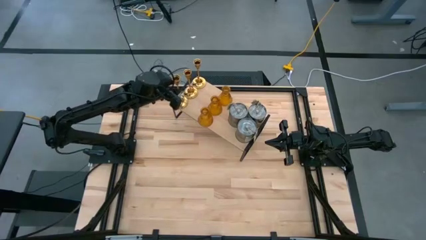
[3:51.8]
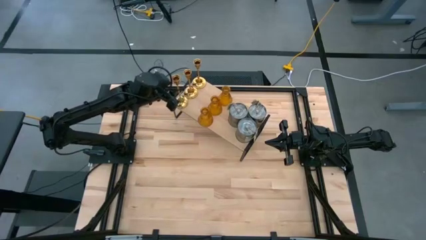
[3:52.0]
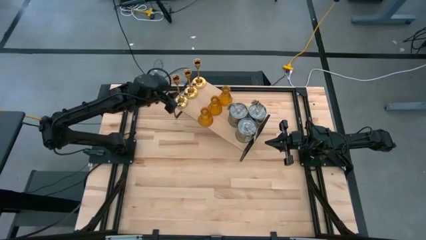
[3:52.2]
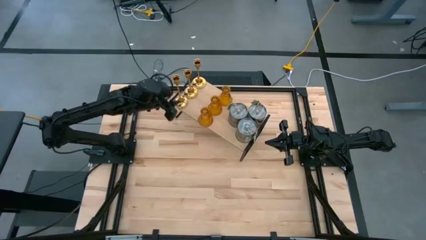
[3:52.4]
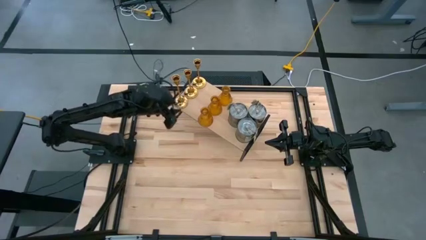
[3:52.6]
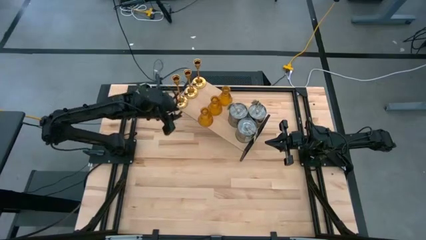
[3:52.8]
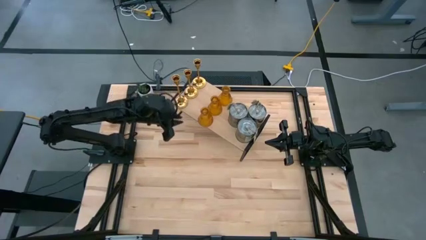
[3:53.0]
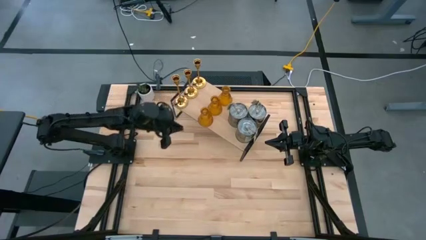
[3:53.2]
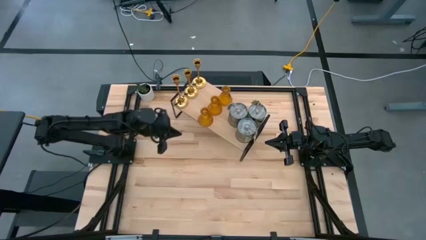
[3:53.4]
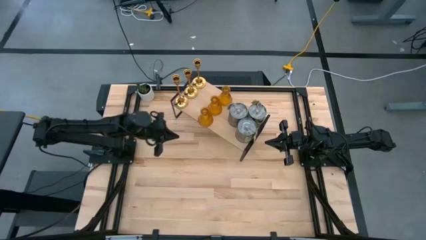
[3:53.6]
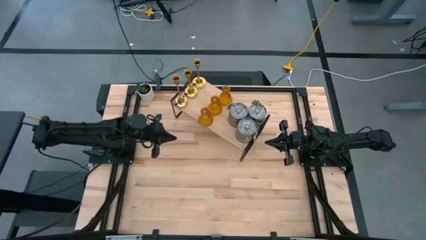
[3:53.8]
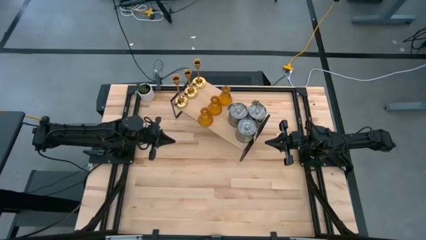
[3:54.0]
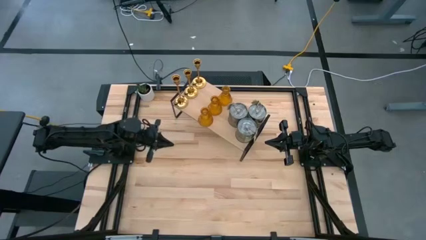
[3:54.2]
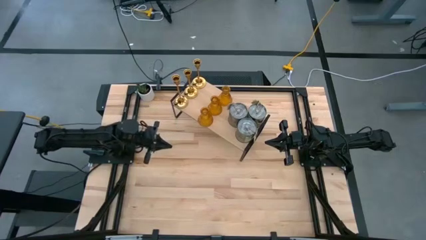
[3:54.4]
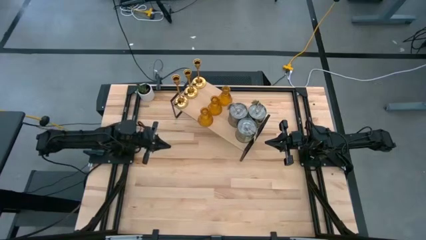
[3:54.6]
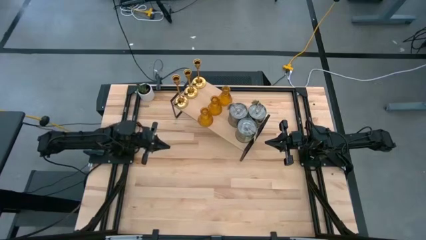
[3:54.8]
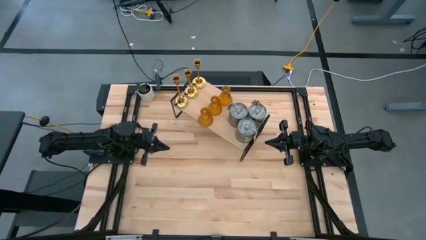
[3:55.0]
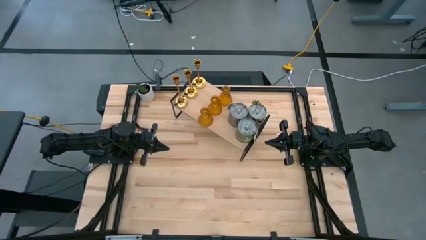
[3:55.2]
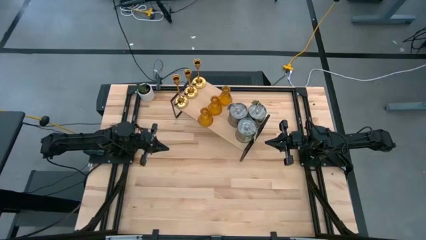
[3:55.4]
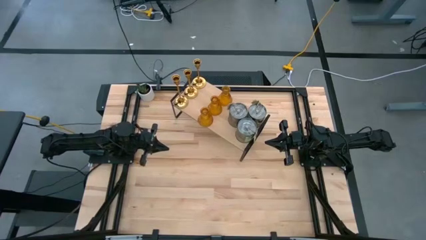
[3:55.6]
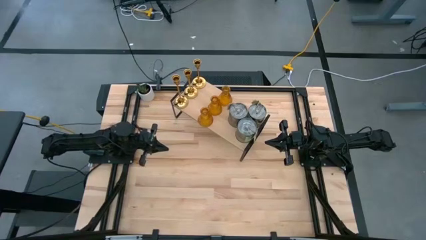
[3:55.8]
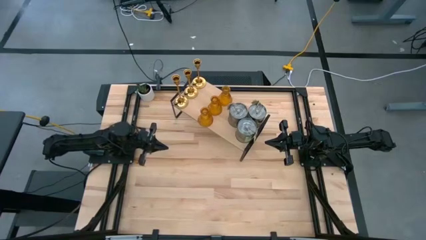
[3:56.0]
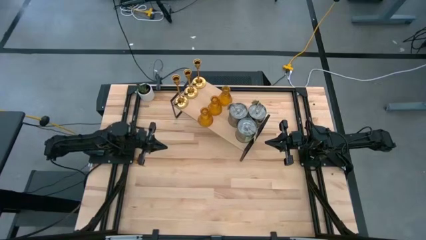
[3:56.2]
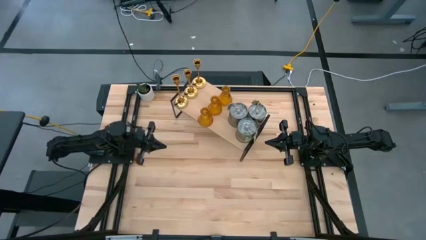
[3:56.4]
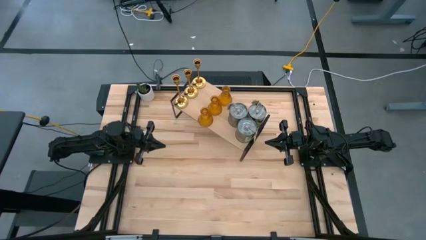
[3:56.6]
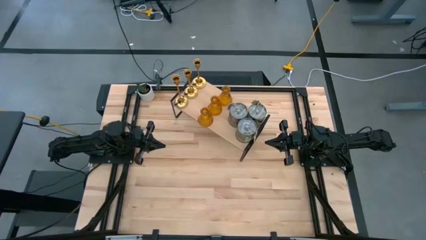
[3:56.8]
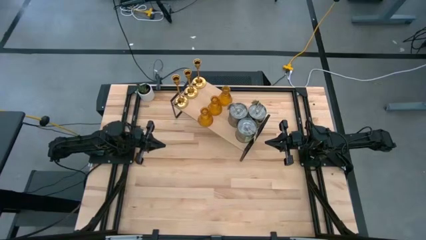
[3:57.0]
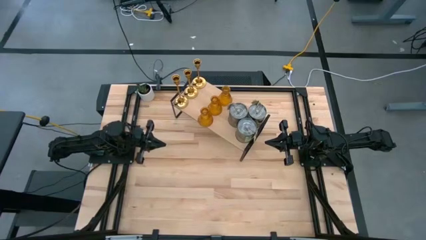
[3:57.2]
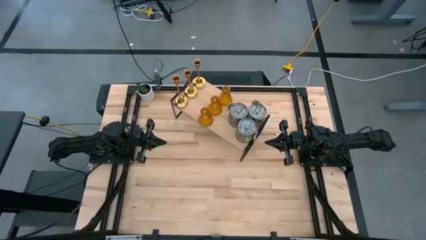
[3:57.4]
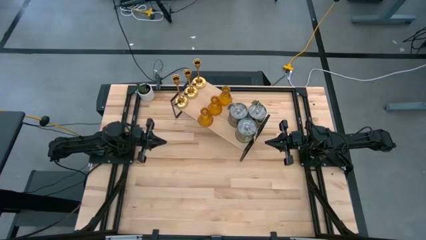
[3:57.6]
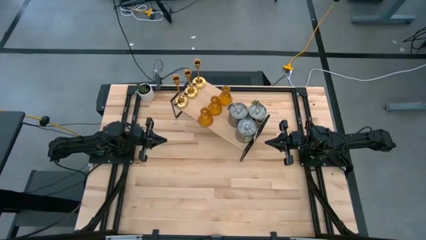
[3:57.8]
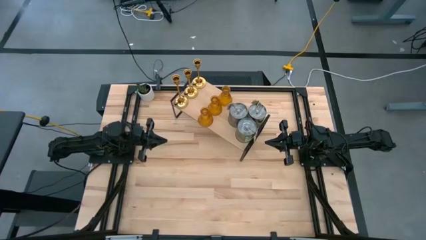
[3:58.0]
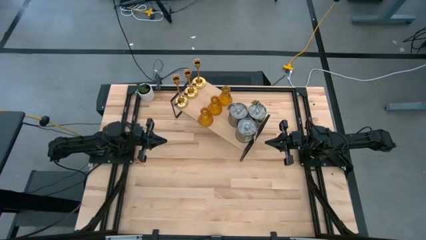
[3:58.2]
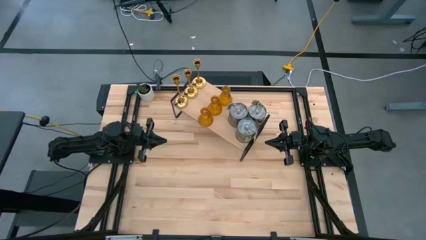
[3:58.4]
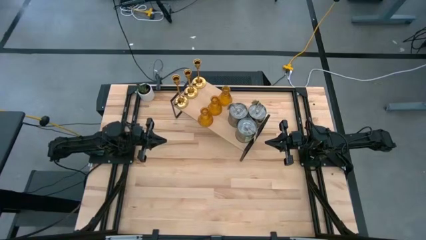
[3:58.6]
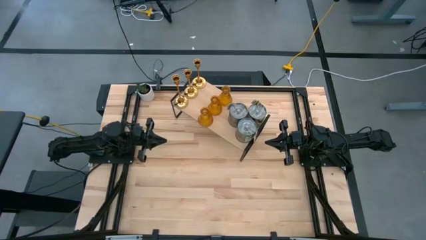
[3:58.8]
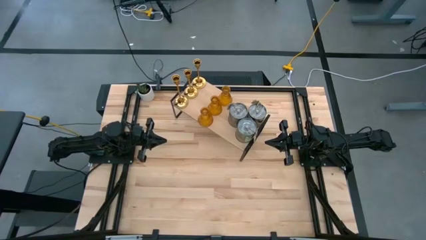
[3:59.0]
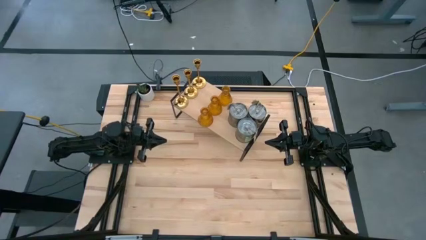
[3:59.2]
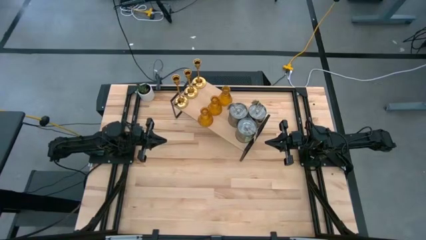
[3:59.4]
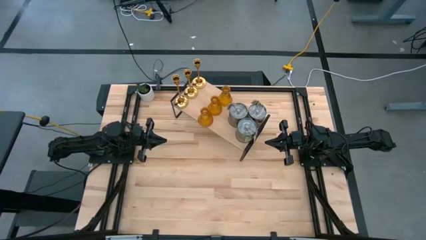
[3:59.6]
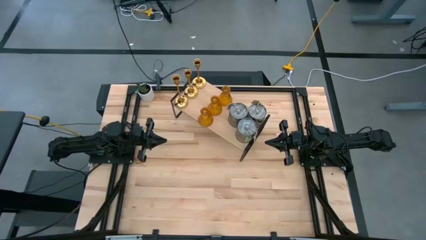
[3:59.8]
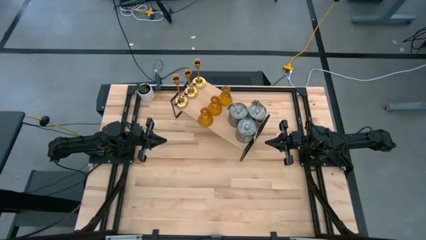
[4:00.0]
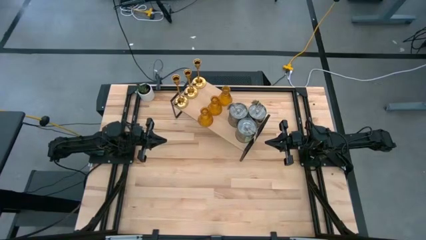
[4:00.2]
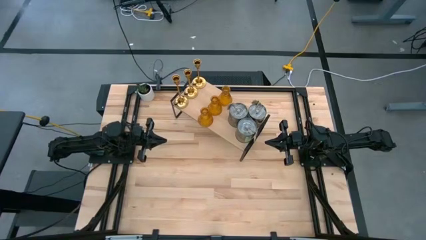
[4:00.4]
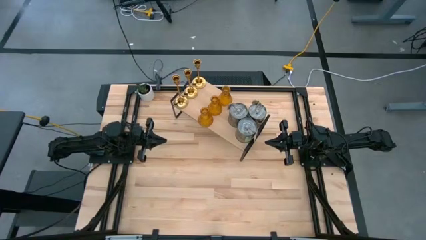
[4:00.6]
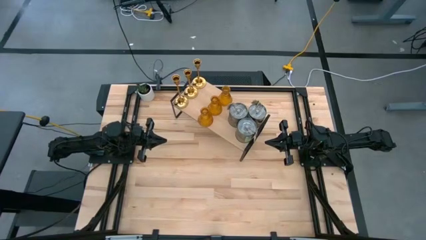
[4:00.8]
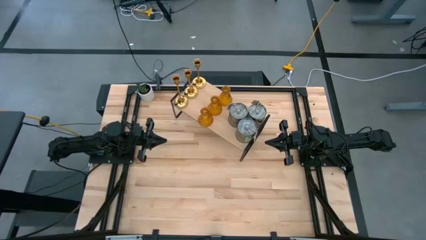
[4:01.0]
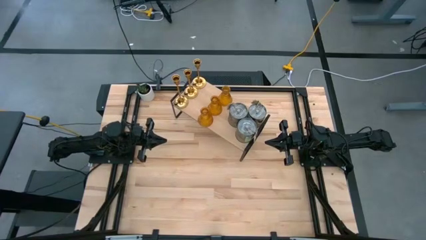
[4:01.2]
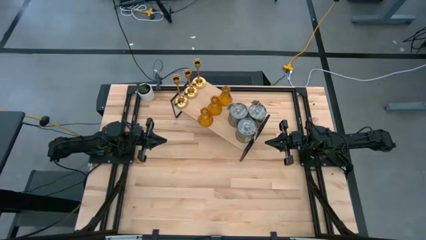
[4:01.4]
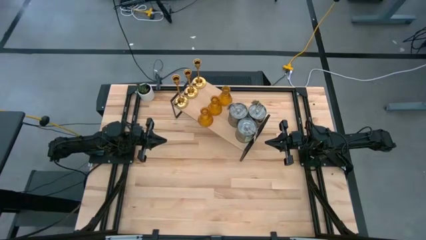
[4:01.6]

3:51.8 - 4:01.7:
Task: Pick & Place candle stick holders
Return to Home Position
